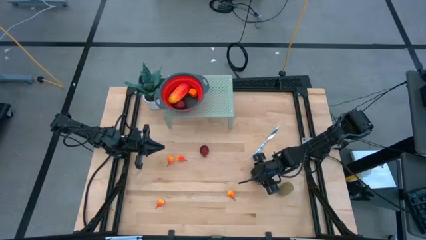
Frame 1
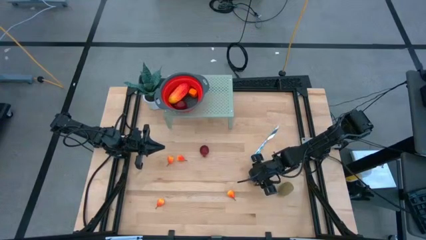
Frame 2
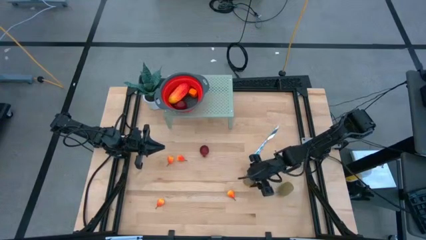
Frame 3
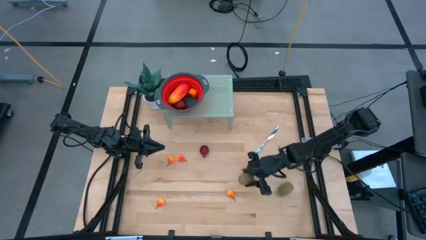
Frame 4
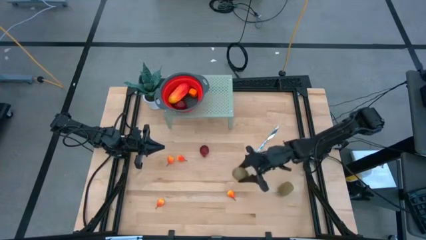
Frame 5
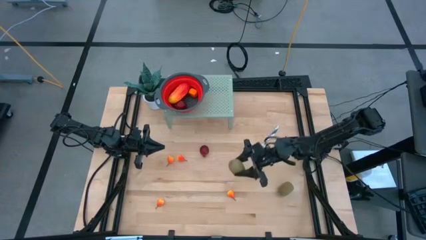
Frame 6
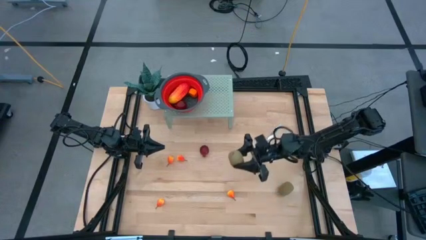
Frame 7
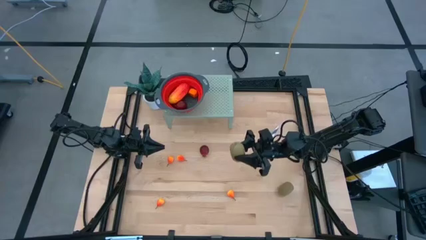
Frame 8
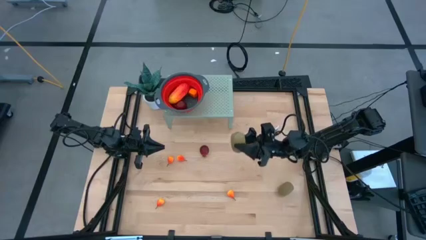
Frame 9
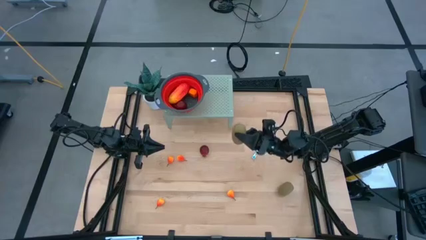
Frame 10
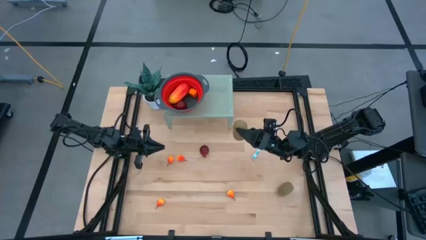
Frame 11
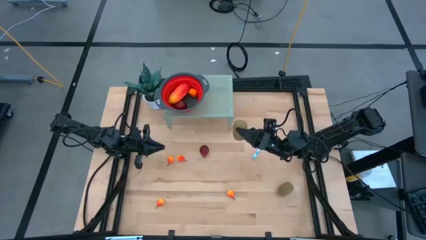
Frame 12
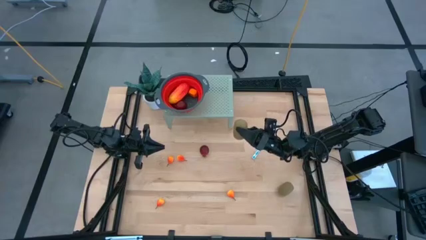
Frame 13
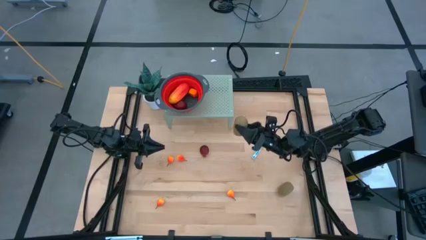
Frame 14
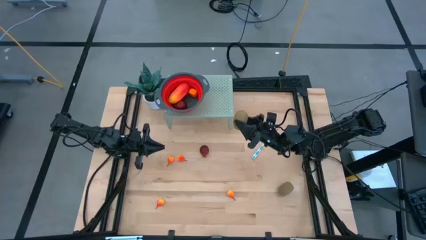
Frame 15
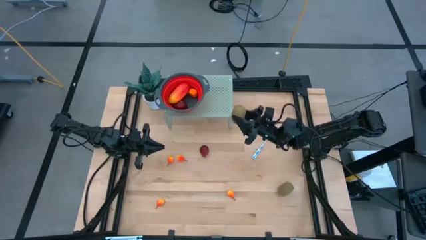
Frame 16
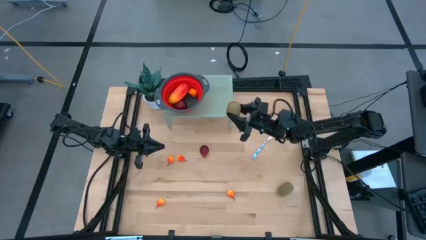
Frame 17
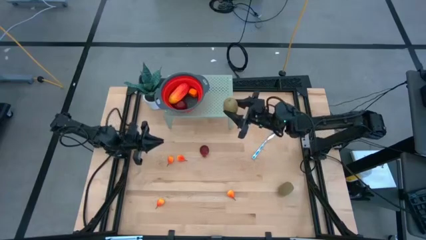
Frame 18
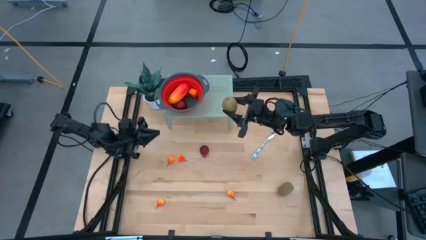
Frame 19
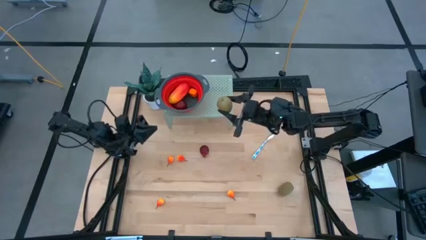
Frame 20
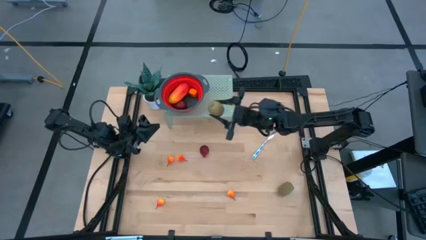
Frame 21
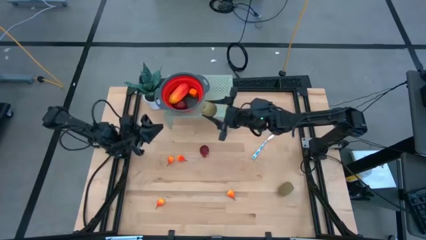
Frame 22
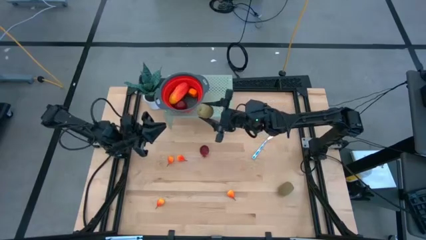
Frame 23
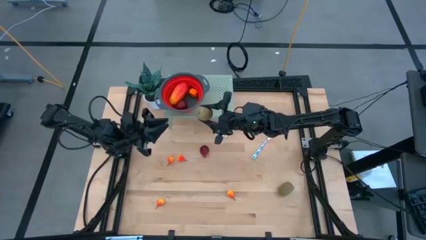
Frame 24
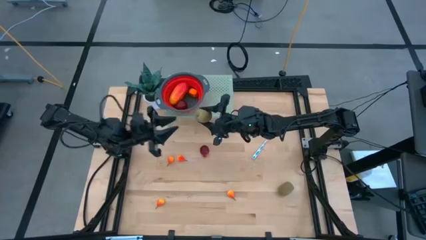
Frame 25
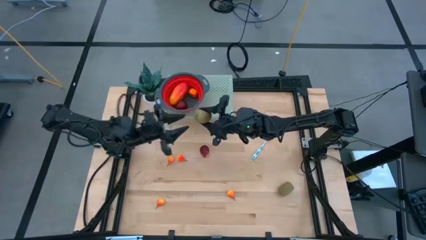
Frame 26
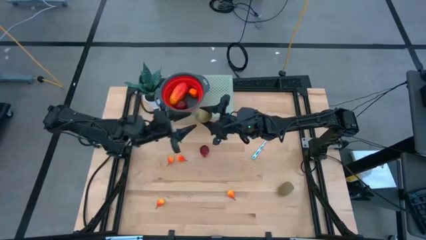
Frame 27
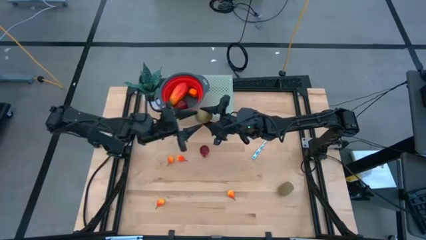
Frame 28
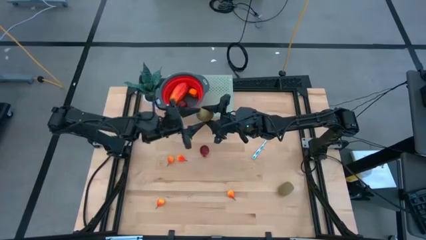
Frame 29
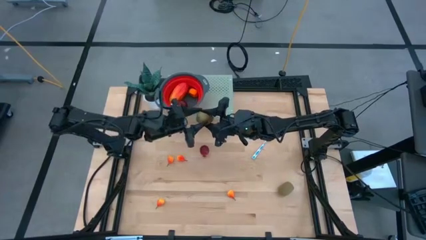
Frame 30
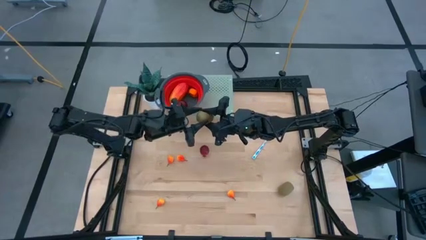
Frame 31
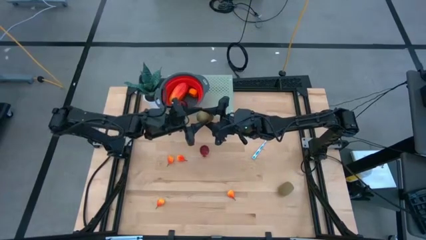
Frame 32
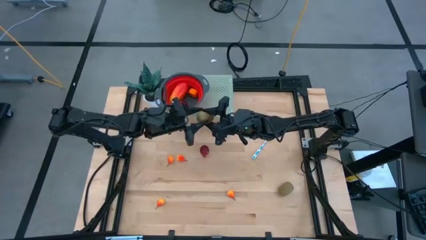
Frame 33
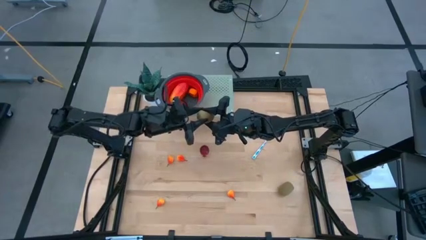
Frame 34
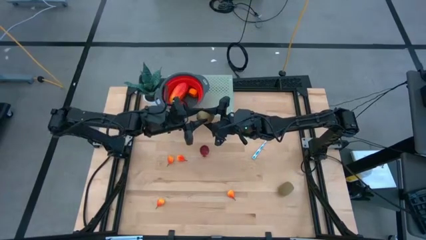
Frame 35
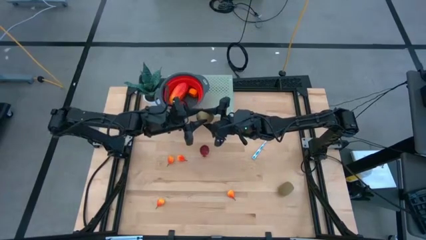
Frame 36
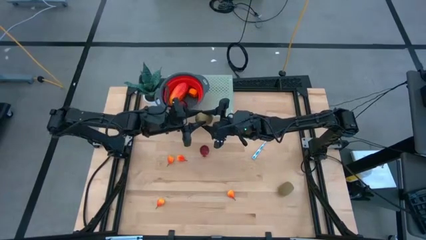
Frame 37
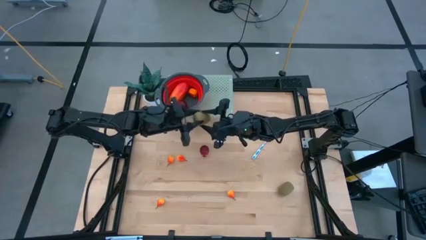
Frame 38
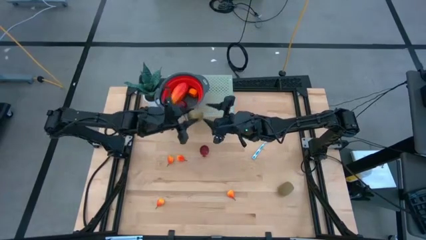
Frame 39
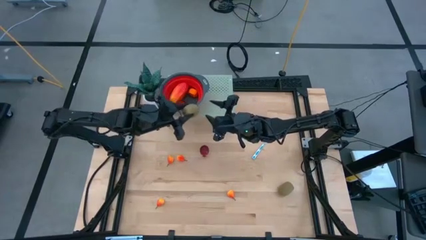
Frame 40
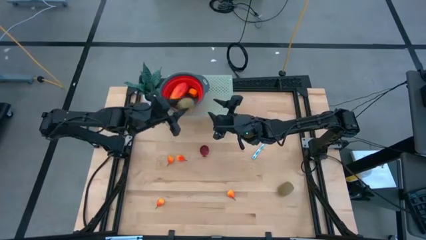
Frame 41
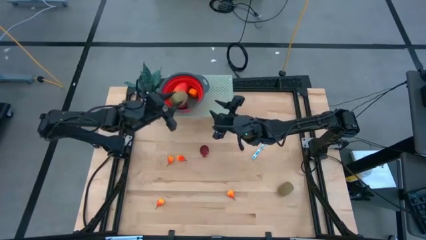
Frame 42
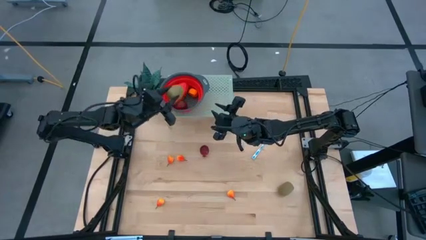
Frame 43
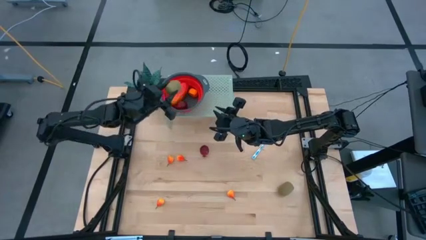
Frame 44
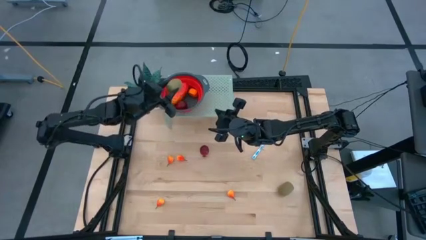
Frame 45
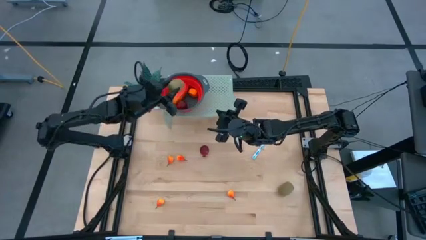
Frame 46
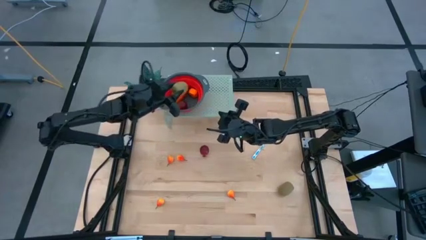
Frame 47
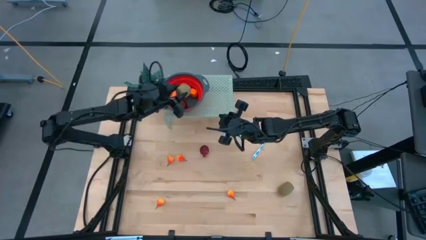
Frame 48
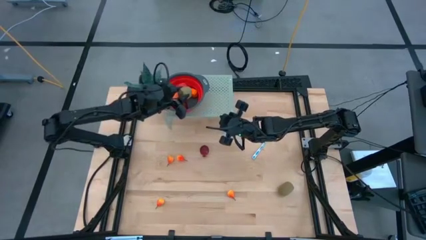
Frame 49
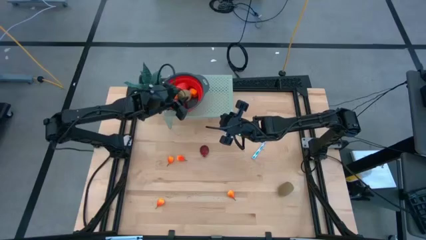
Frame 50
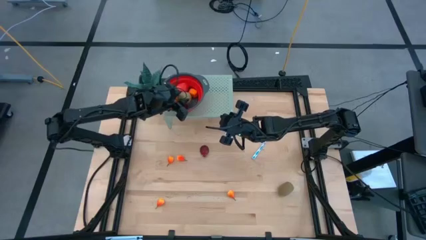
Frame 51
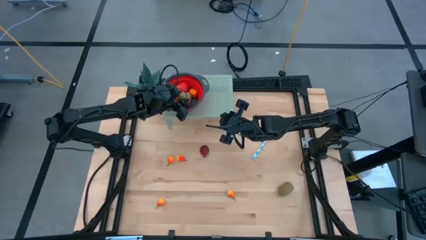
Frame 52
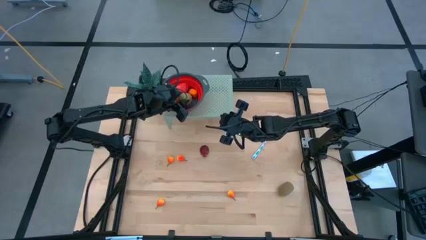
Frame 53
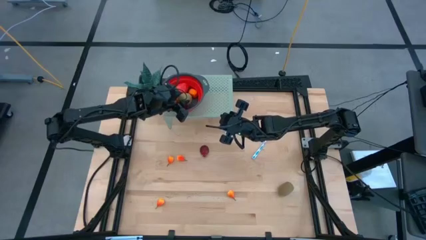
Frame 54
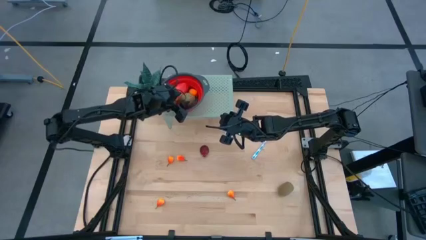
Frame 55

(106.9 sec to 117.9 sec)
Task: Pick & Place Fruit
Put the kiwi into the red strainer bowl on the shelf
